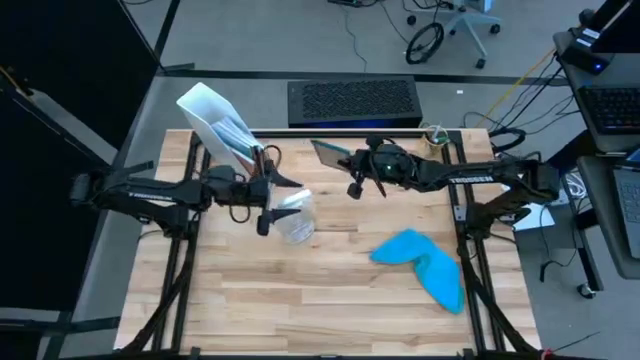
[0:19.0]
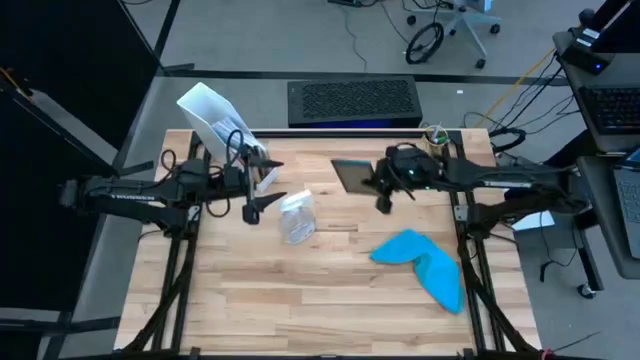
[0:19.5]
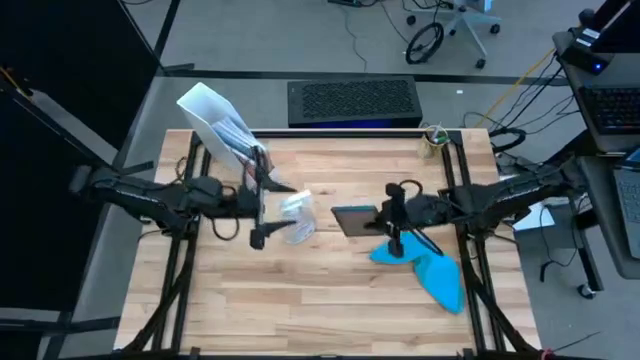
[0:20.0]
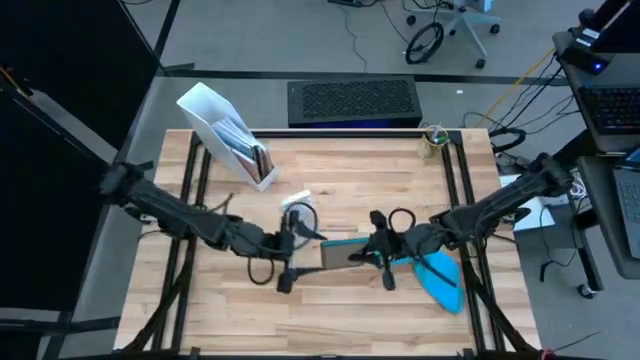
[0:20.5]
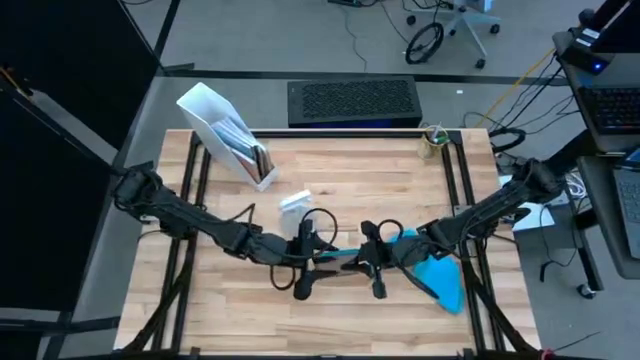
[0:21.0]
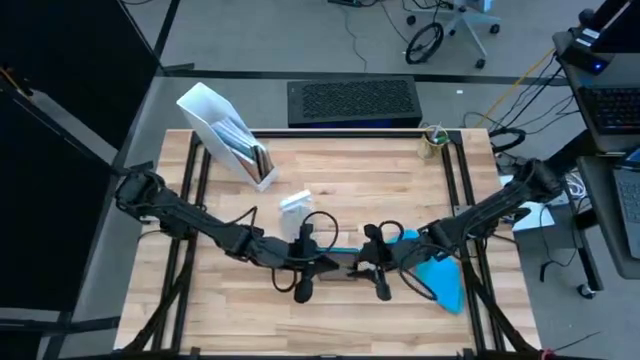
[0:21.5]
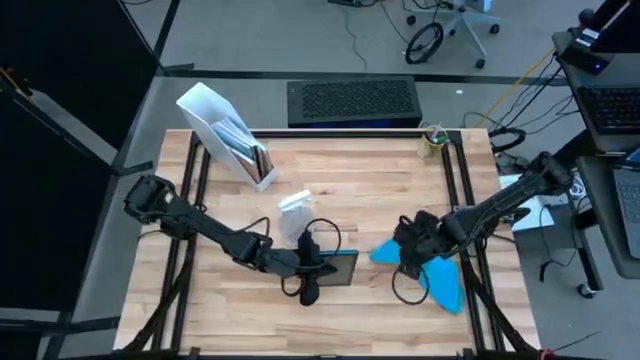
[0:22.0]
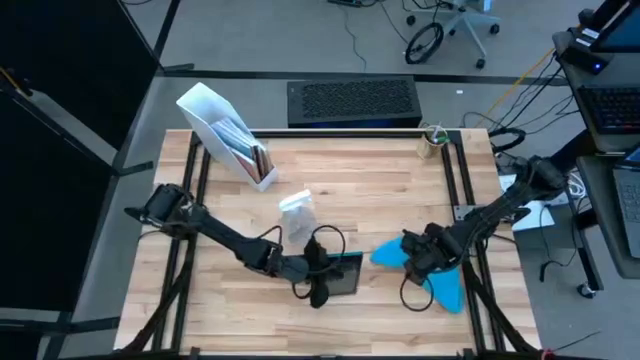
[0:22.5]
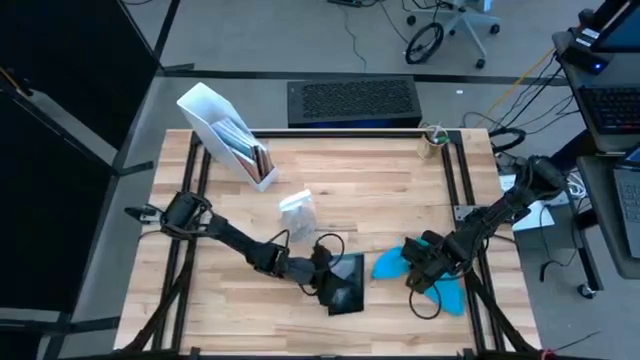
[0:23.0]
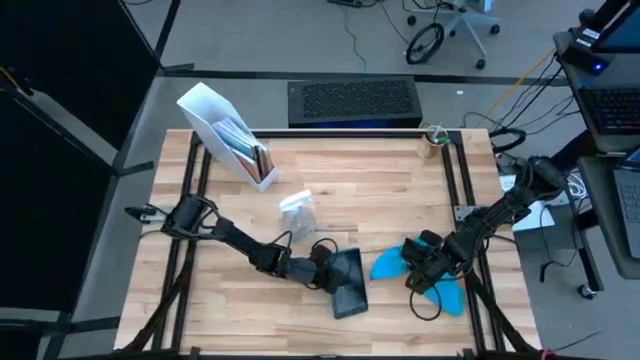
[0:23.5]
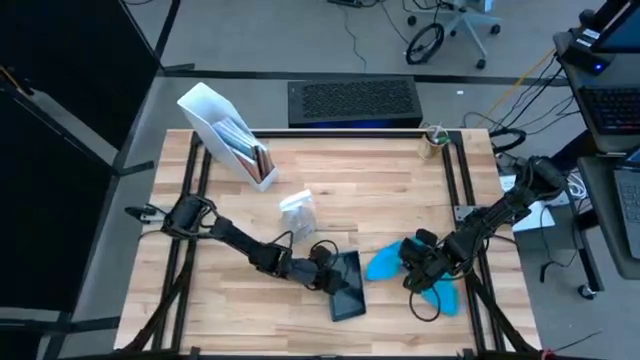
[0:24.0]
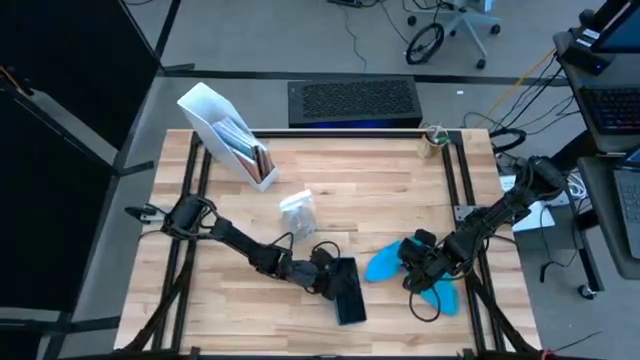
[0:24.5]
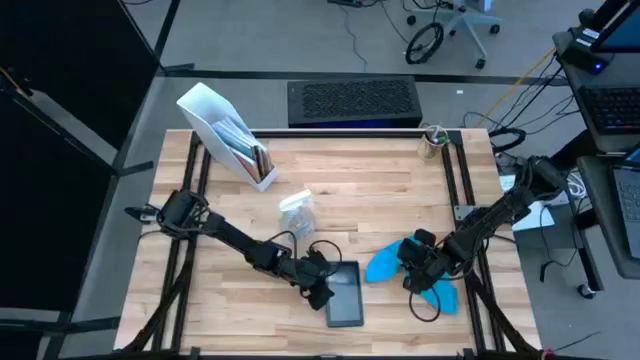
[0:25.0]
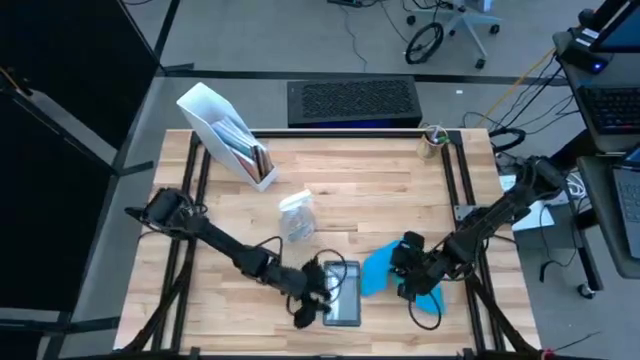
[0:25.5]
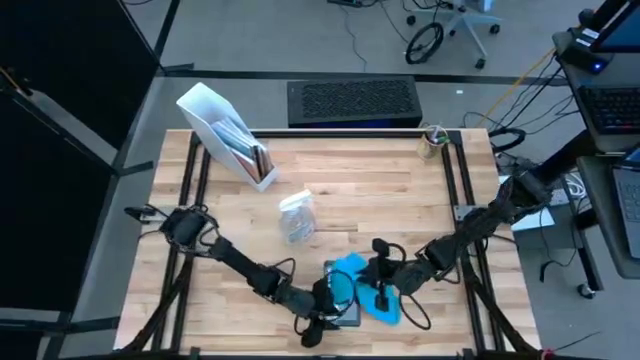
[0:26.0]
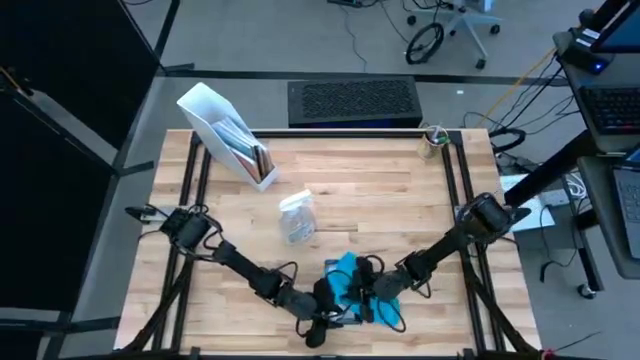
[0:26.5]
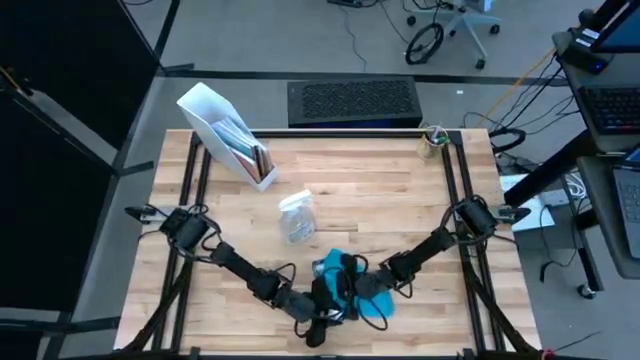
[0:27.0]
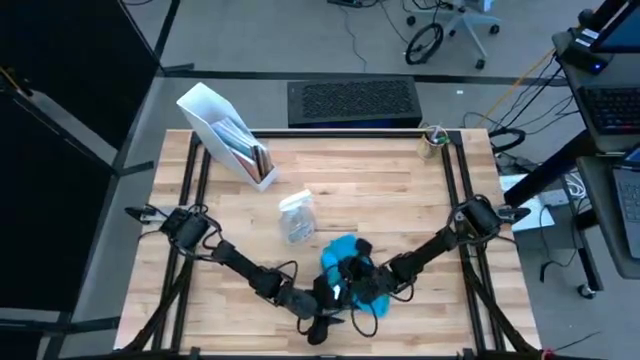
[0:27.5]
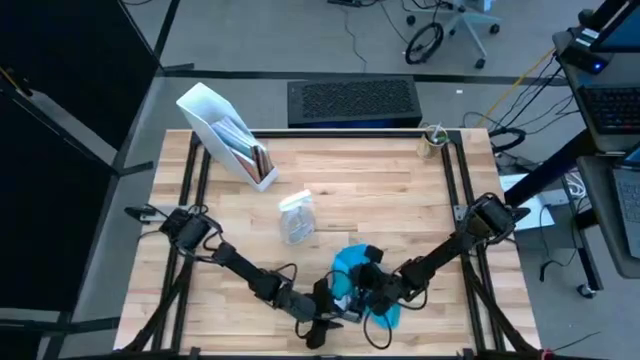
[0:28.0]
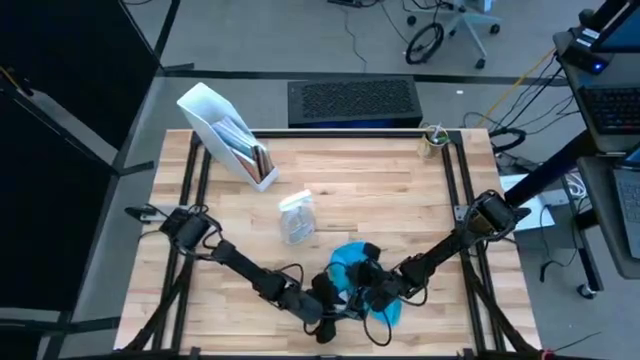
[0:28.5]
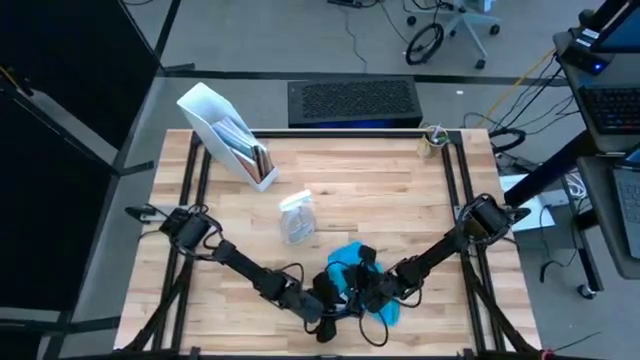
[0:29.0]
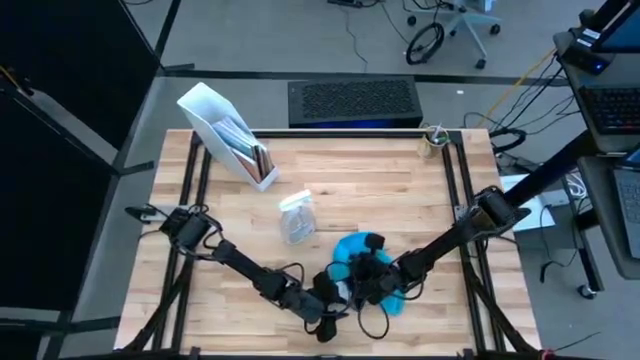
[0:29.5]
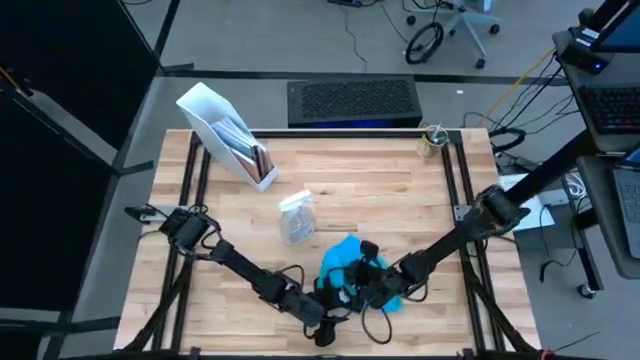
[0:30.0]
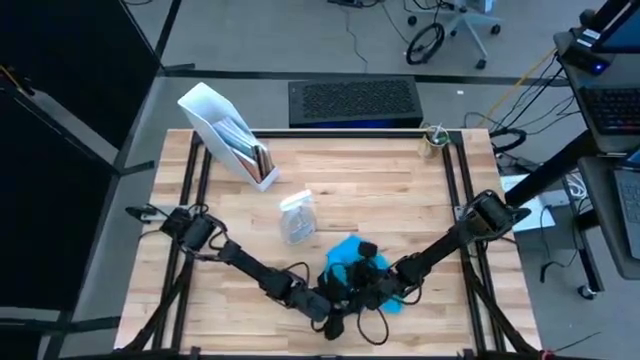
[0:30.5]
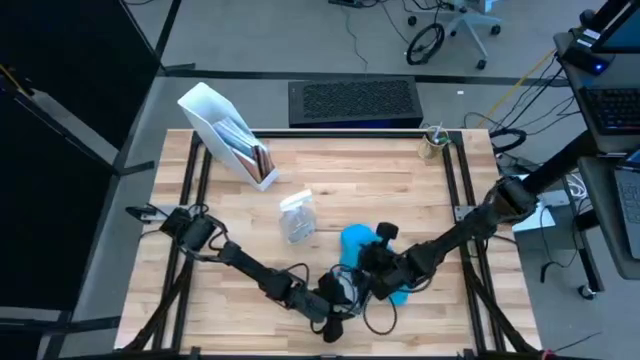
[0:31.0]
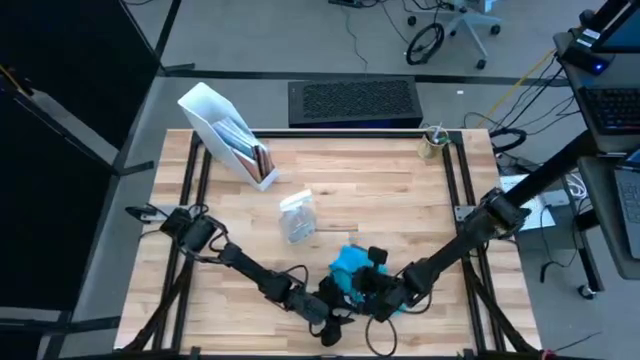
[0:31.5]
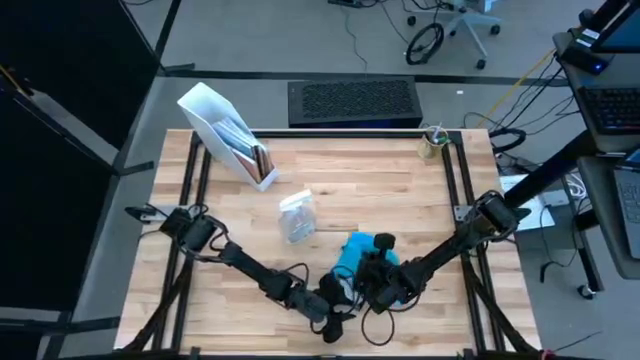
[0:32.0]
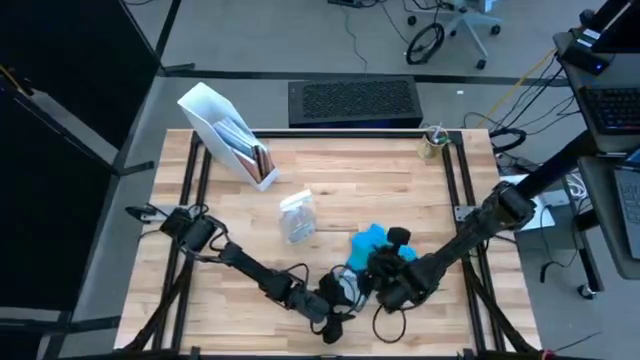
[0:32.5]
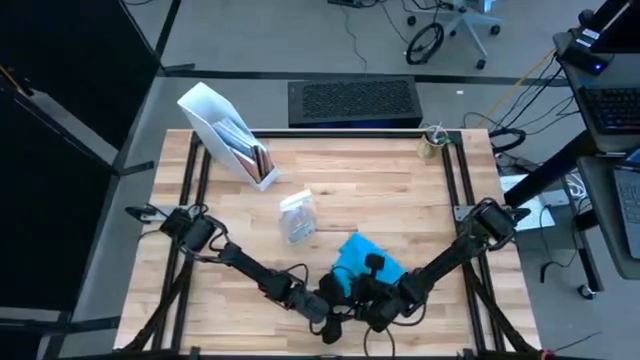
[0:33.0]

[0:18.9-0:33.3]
Task: Apply microfiber cloth
Wipe the blue tablet with a blue microfiber cloth

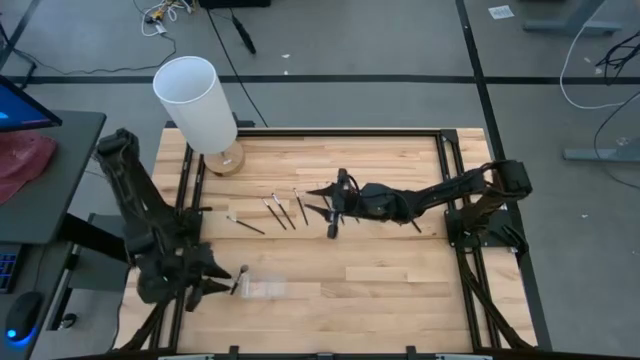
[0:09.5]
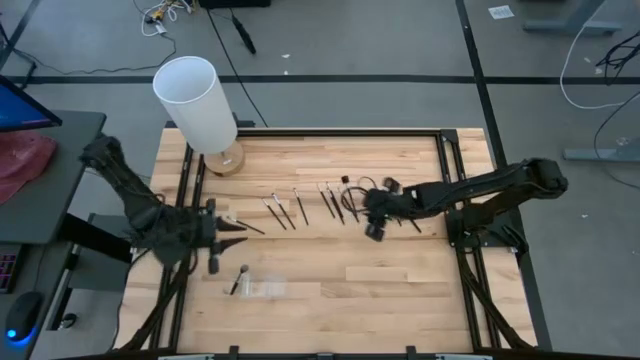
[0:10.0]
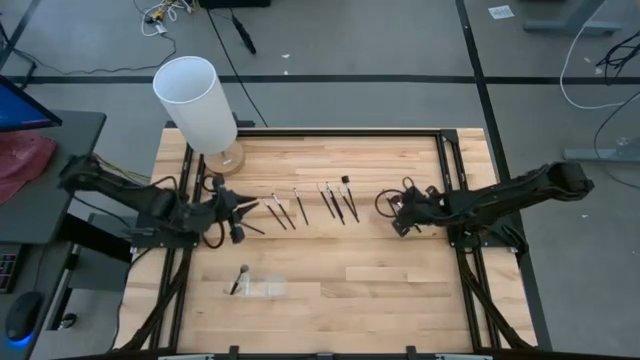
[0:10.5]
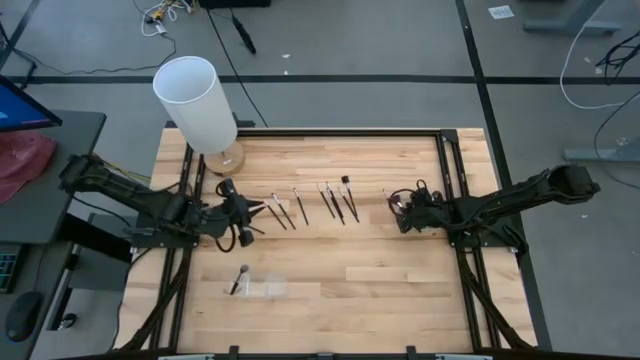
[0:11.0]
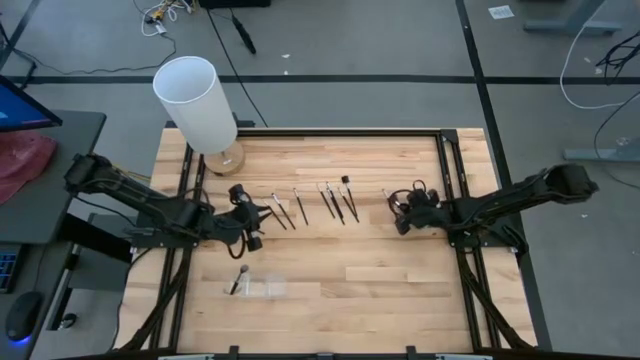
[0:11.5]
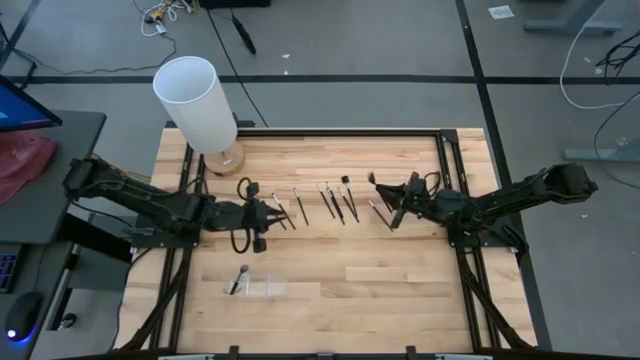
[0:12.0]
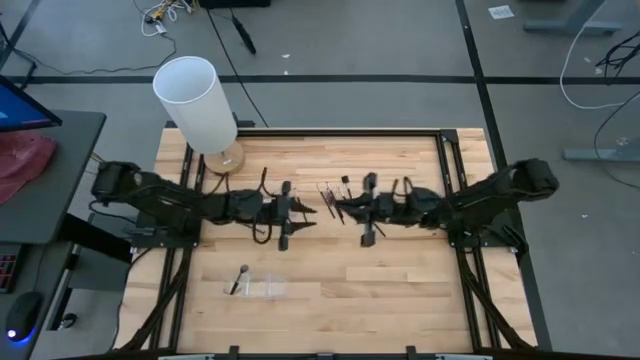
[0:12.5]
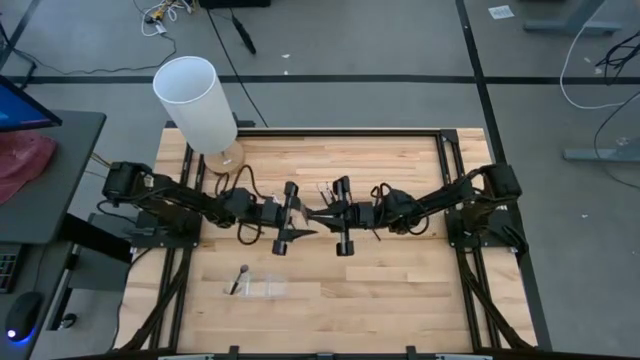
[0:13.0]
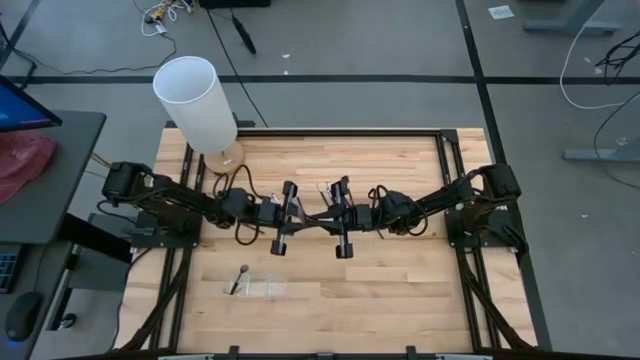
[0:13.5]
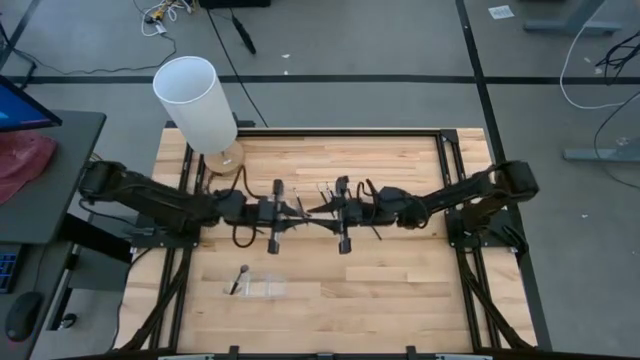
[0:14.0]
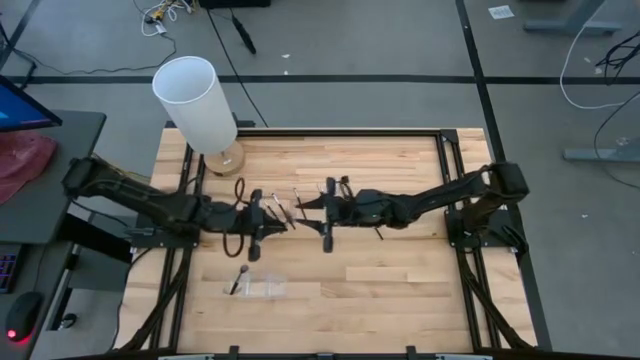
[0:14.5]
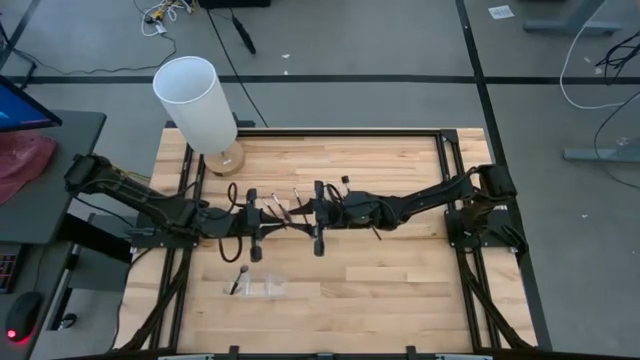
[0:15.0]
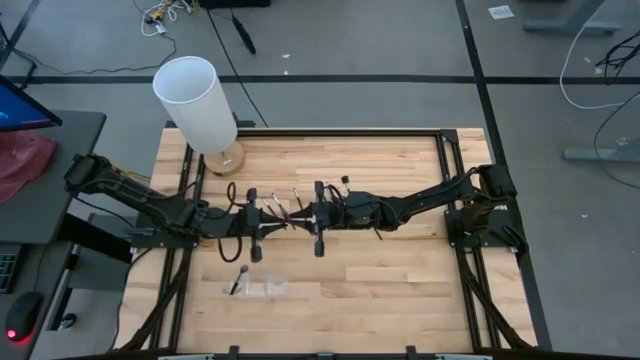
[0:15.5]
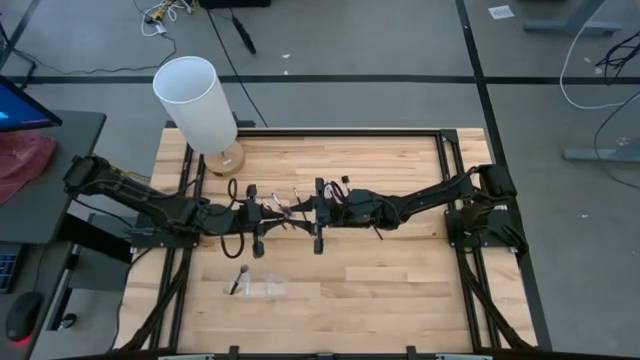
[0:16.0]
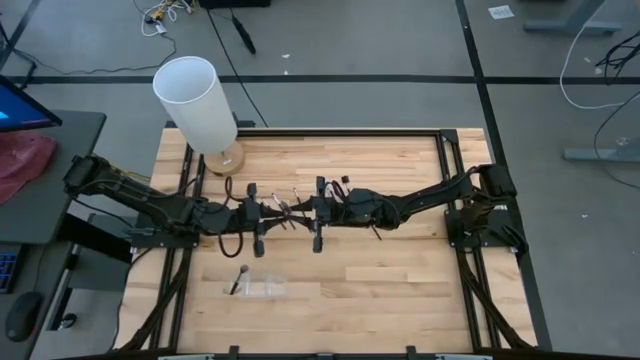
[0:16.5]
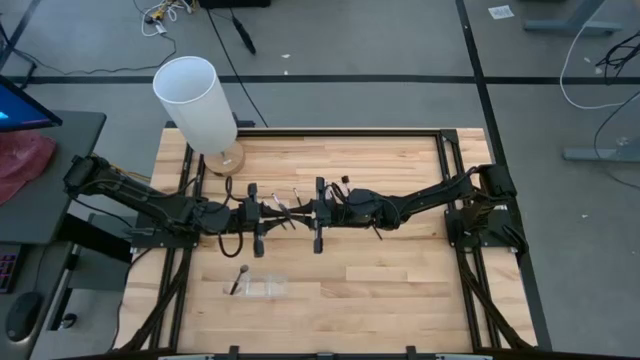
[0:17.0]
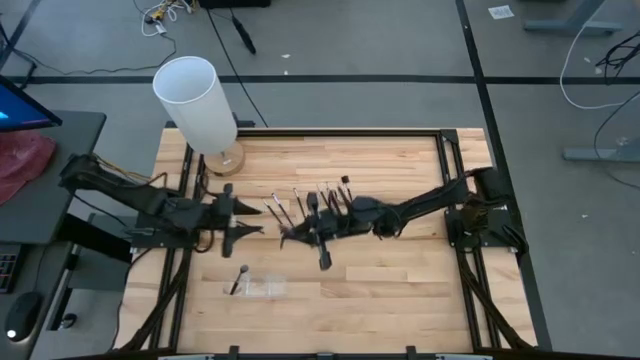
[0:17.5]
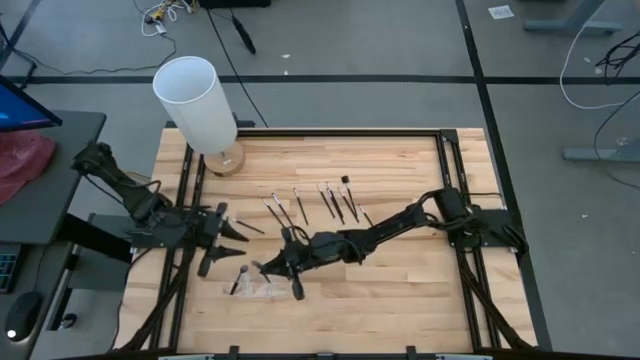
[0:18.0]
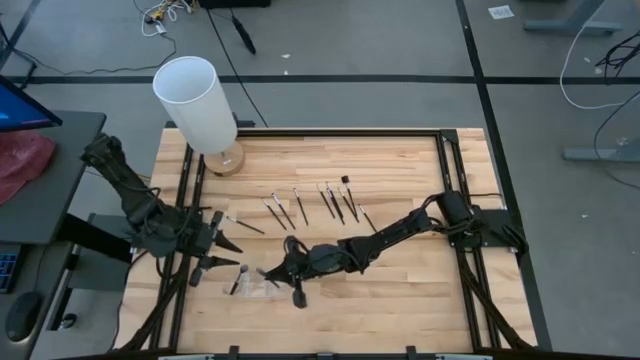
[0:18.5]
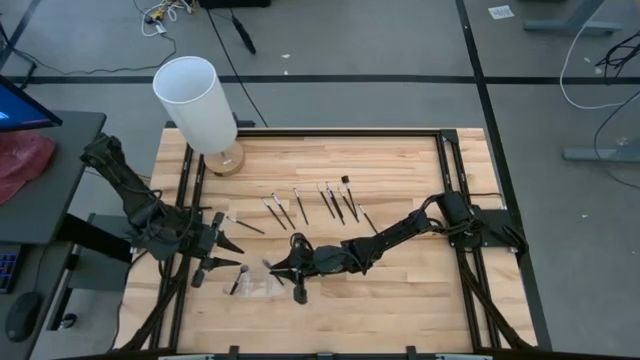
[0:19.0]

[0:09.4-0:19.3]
Task: Put items in baskets/containers
Put the highlighter brush into the transparent organizer
